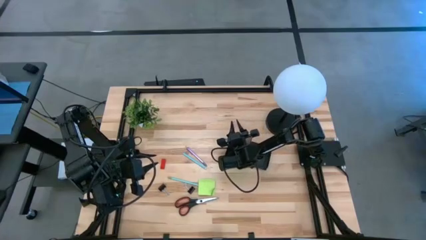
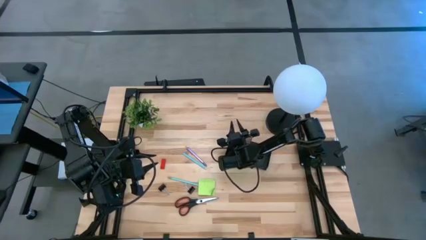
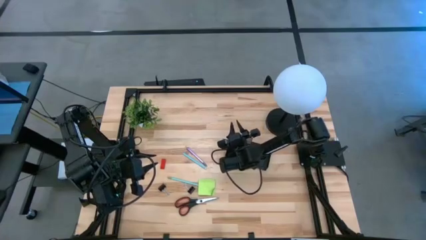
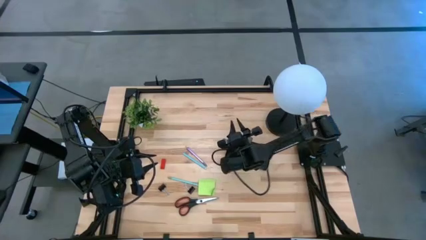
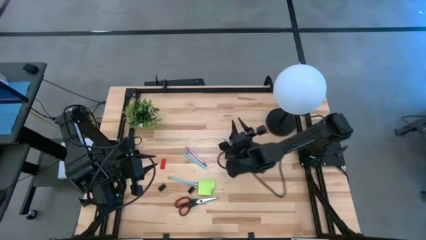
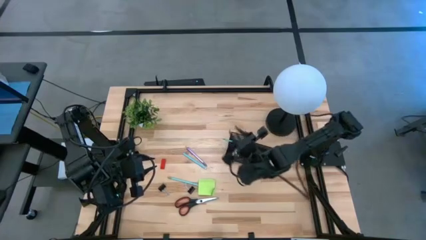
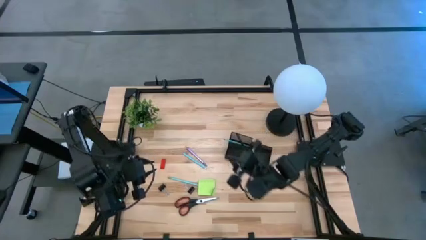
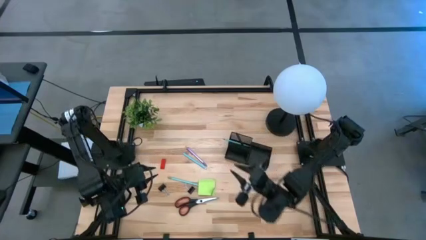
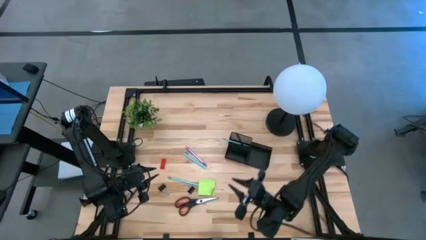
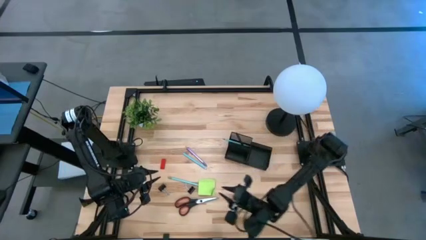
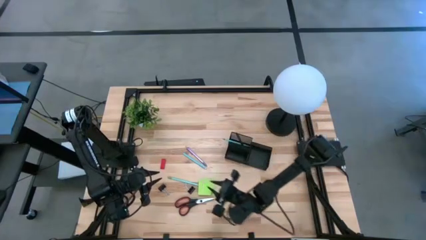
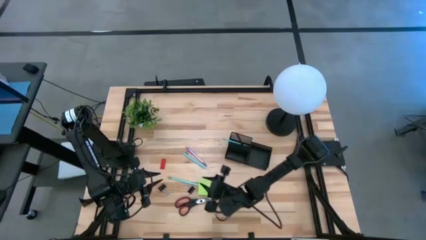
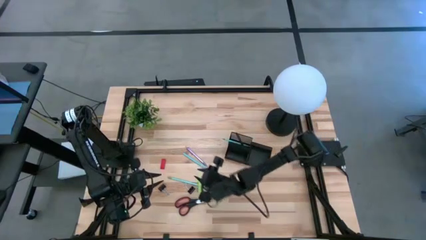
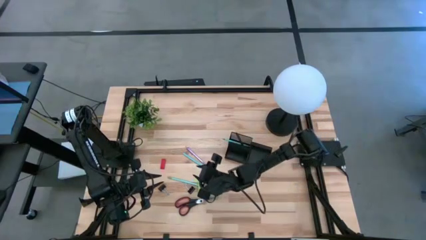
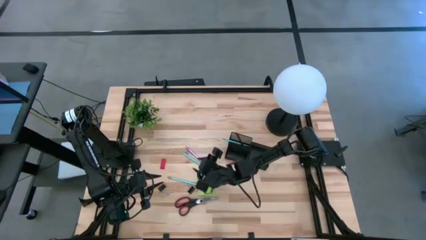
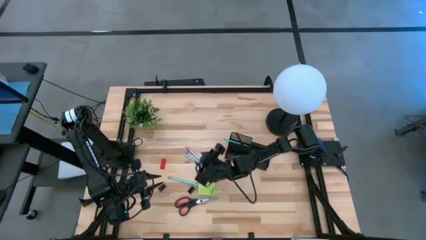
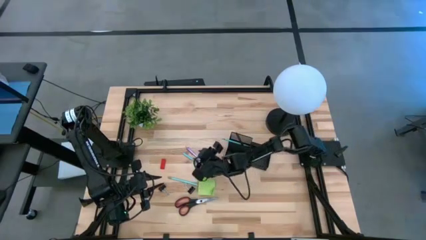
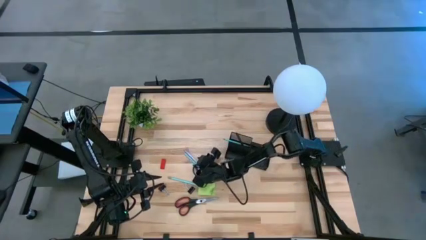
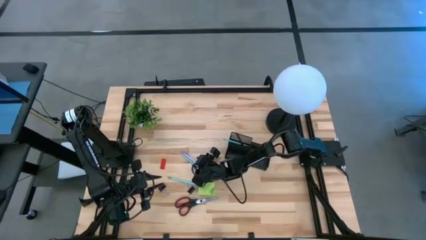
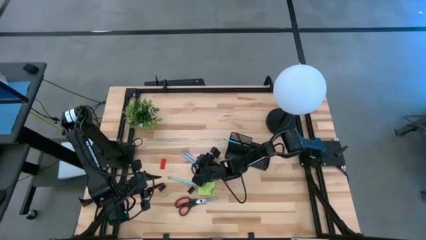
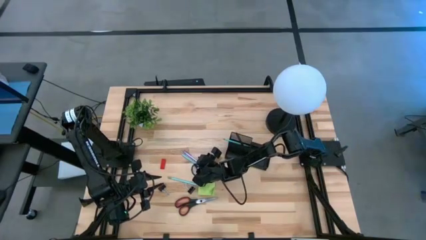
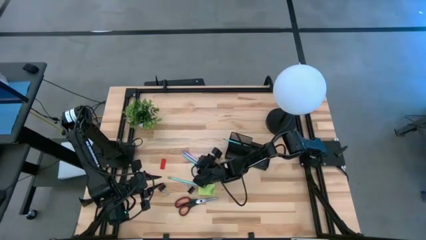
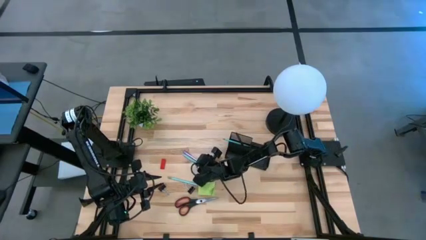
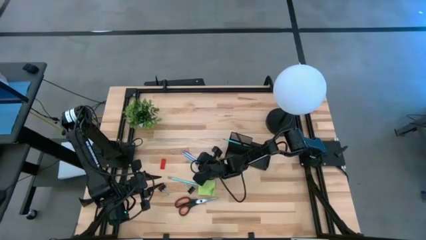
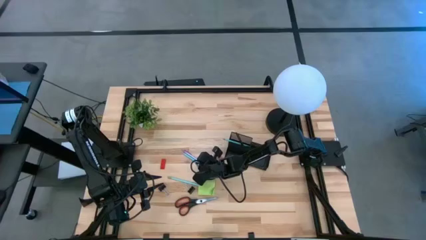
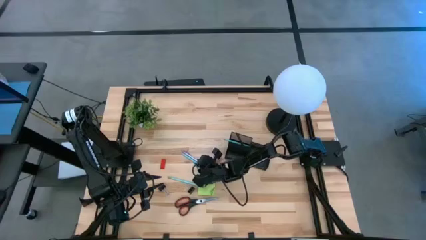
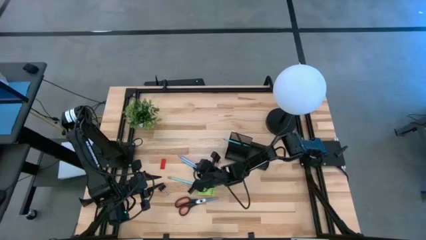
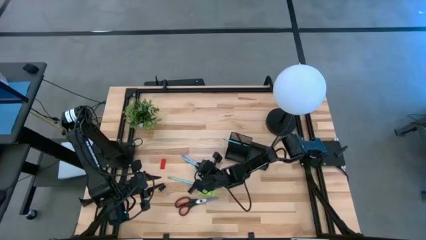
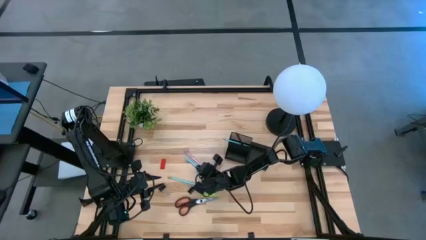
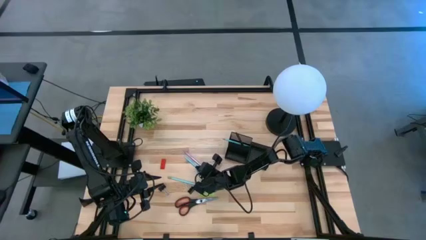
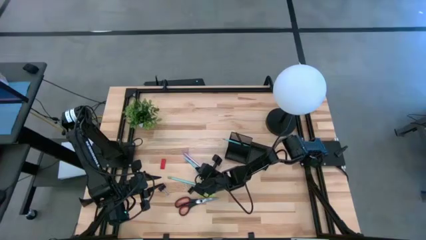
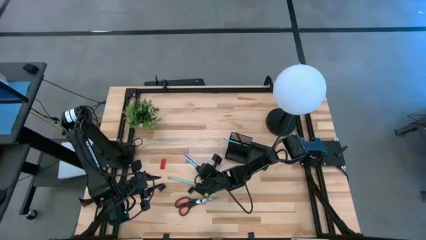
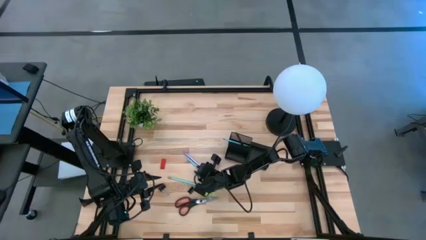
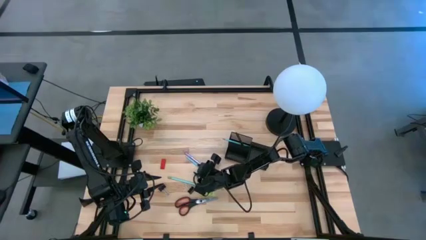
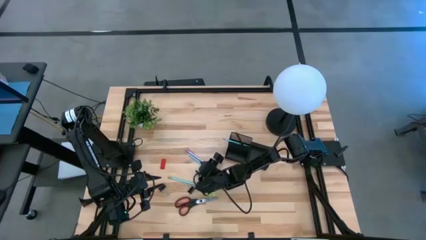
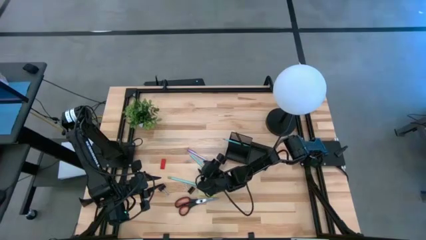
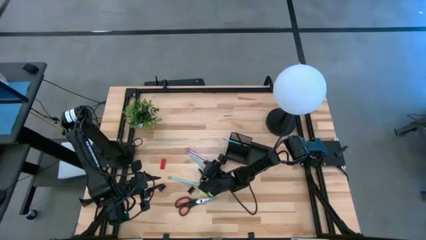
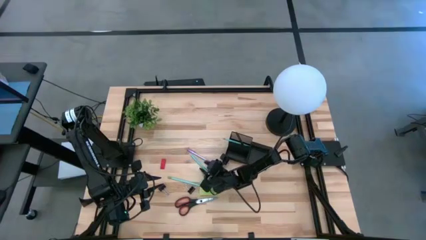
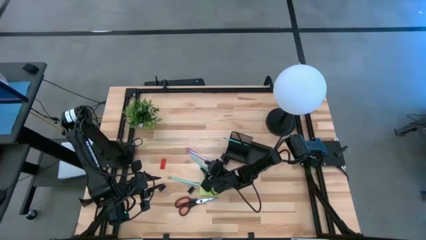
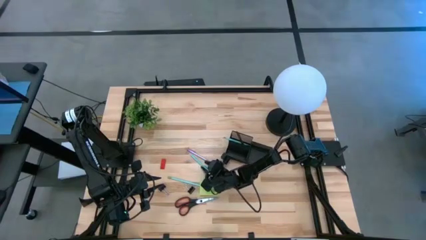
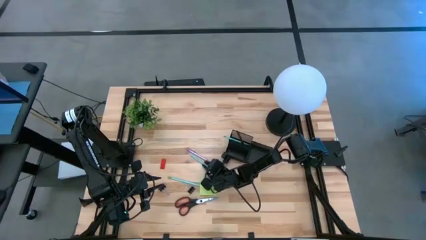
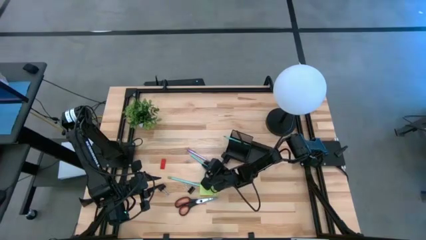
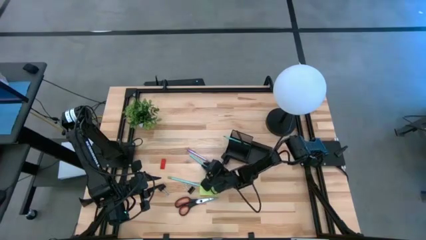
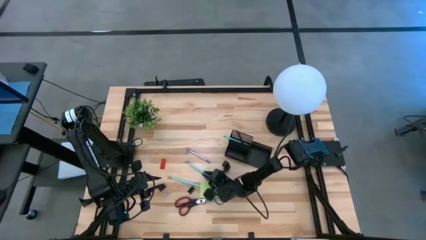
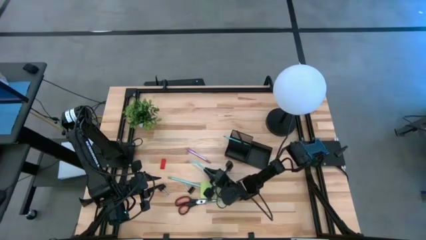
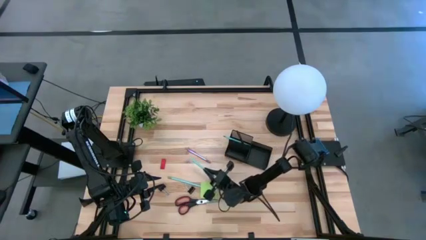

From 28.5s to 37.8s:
Task: Pick and place office supplies into organizer
Put the blue pen into the desk organizer

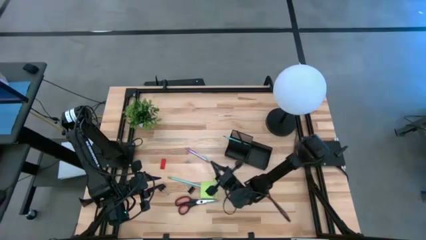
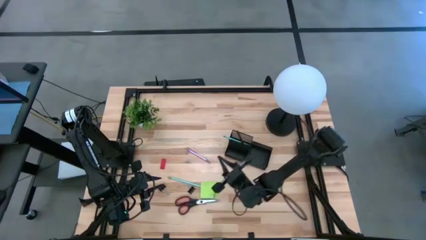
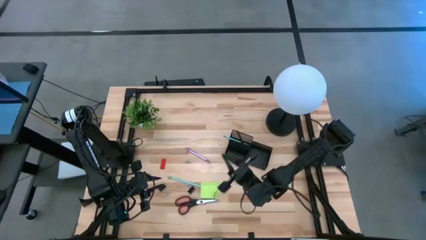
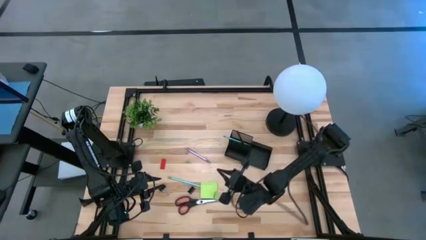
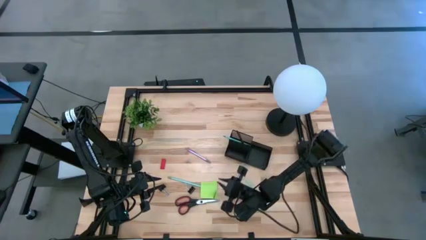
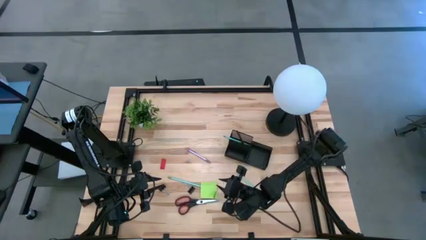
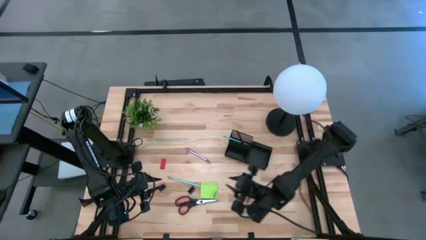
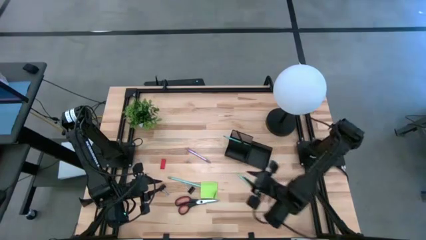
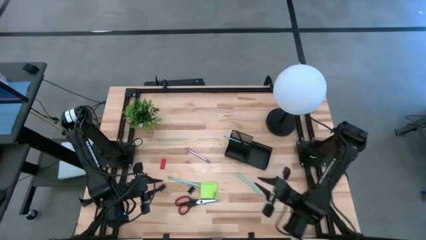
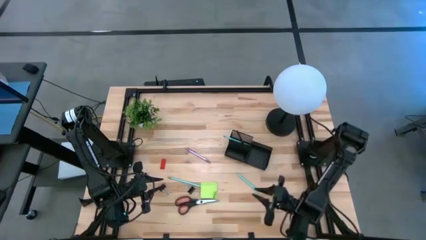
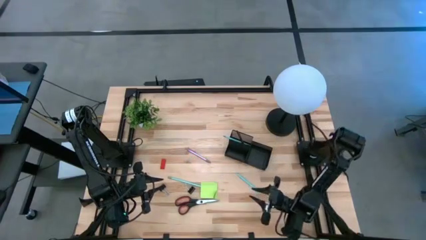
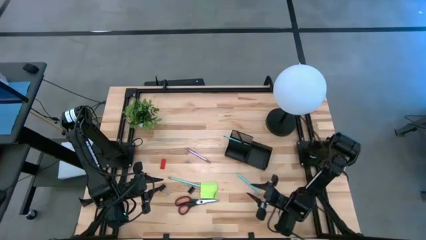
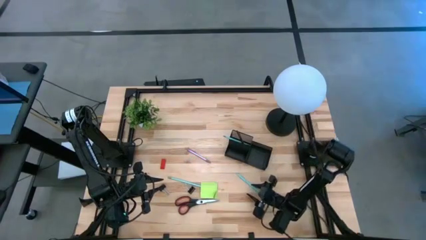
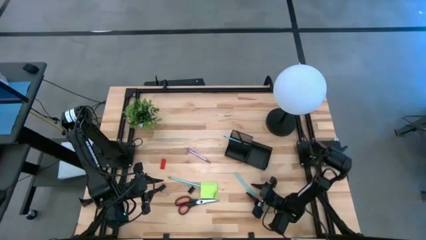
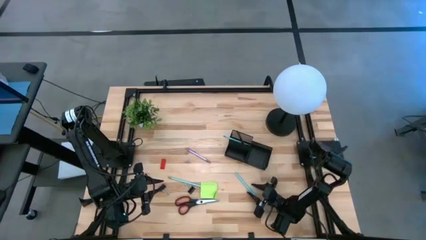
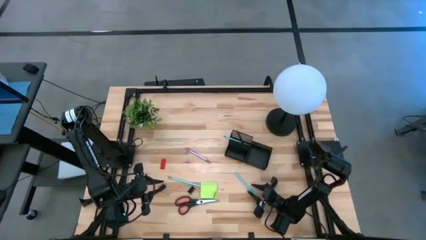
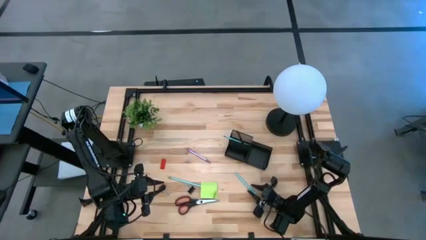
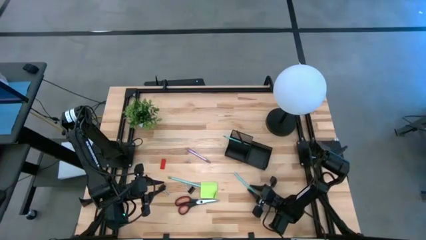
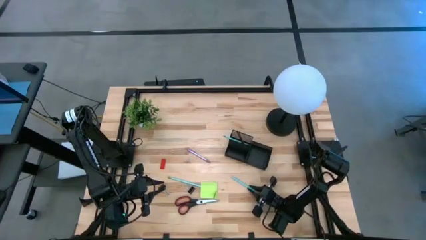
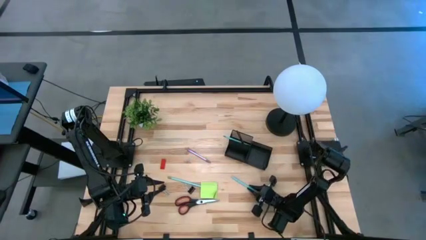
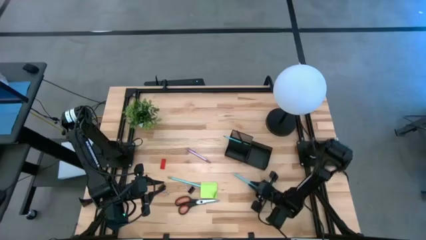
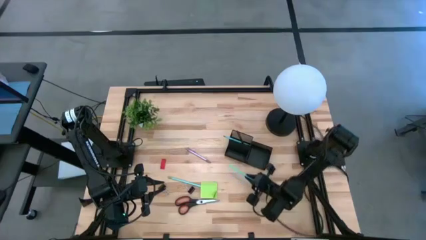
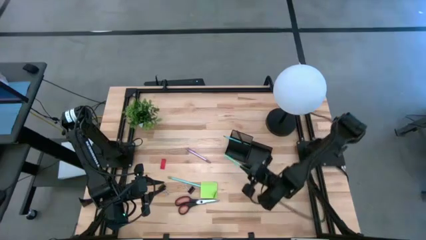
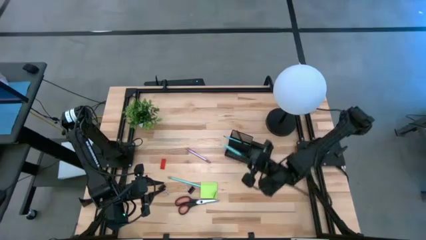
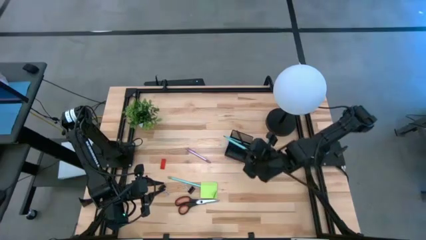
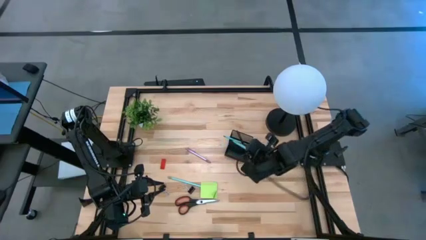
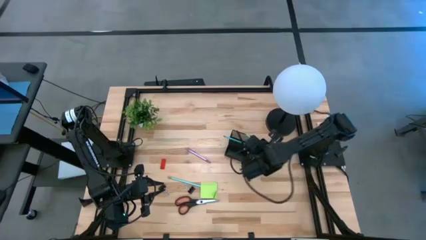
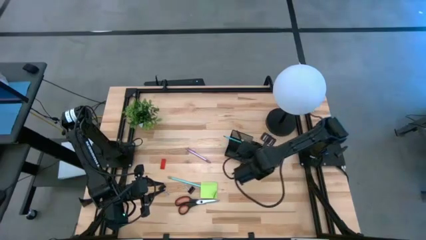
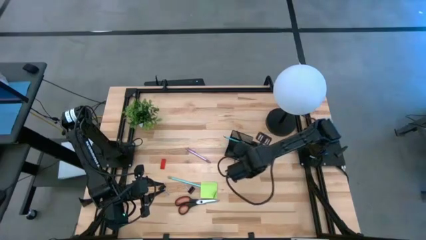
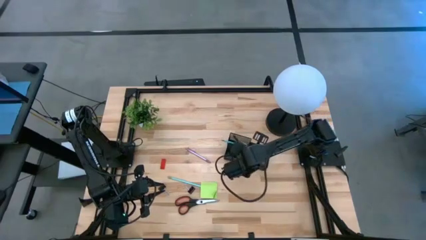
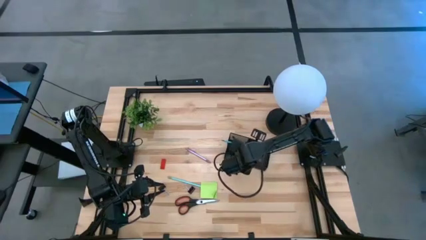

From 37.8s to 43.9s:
Put the blue pen into the desk organizer

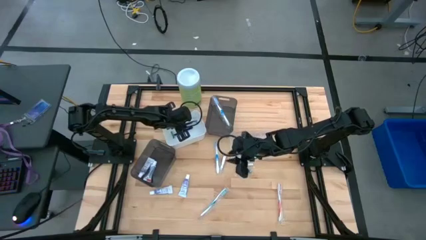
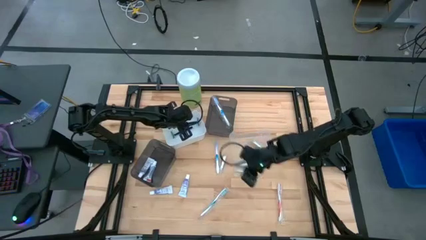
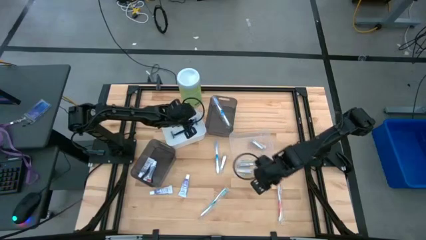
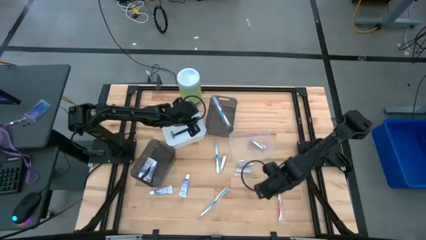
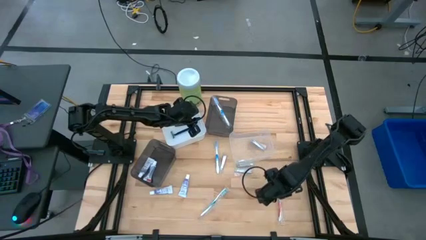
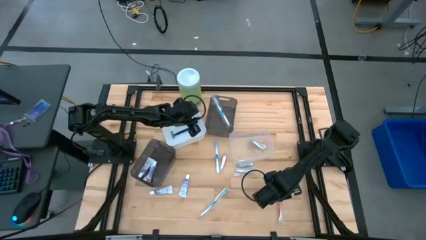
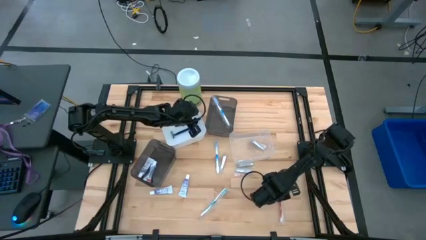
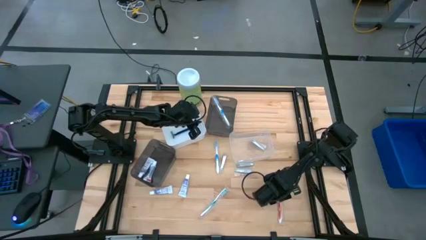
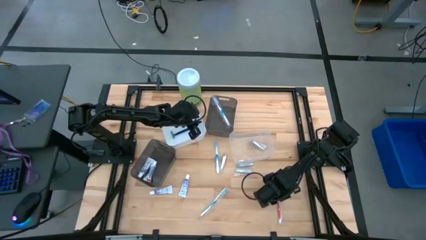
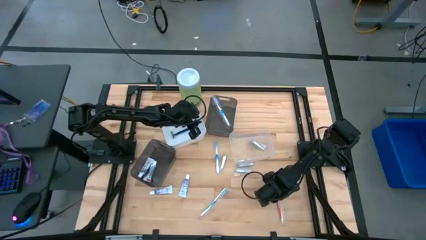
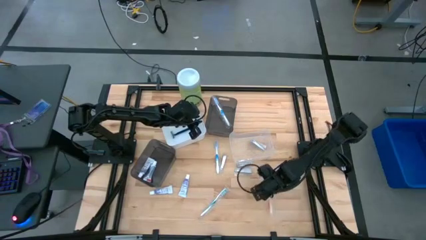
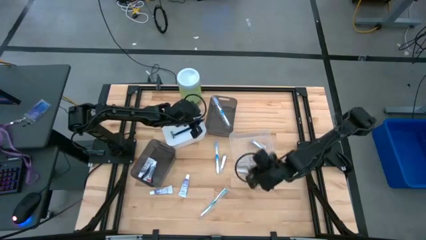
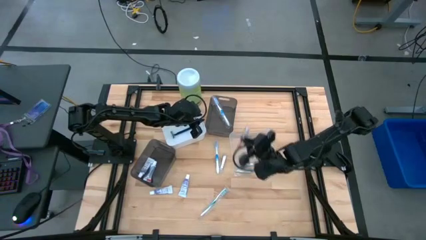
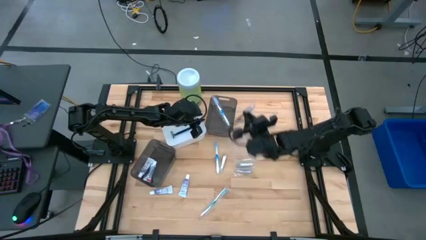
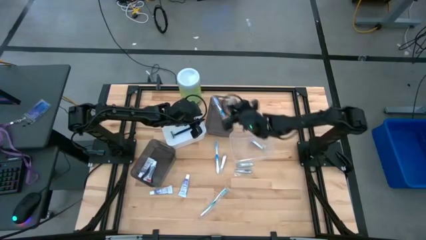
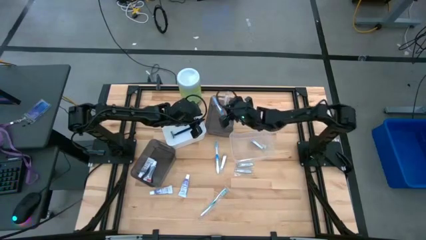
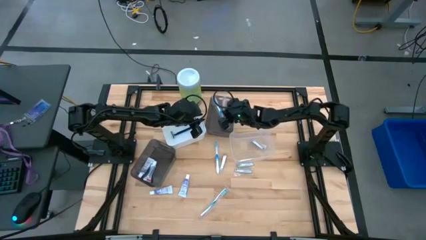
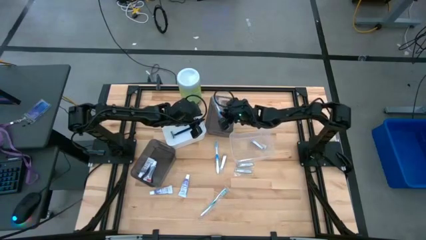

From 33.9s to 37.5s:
Task: Pick & Place Travel size toiletries
Put the red toothbrush into the top black bin
